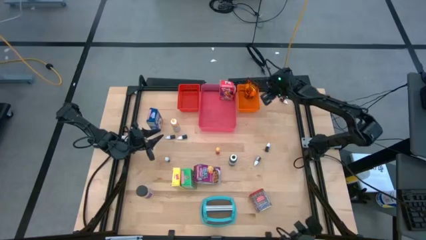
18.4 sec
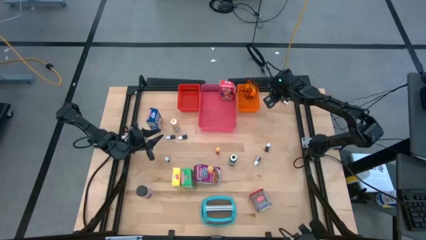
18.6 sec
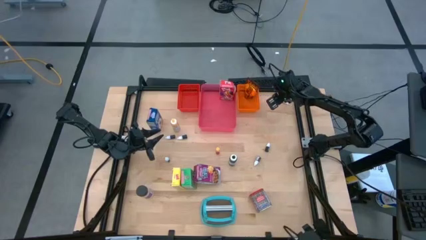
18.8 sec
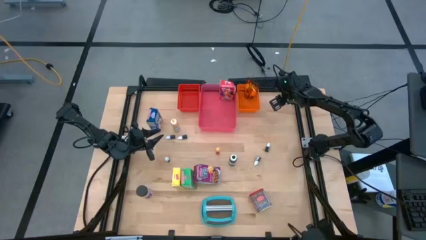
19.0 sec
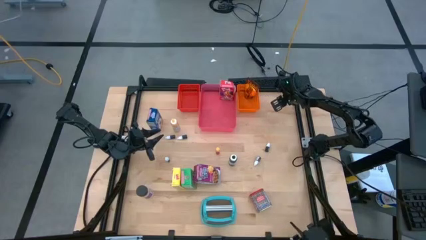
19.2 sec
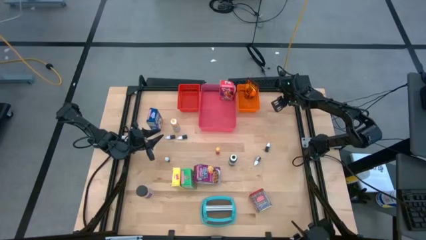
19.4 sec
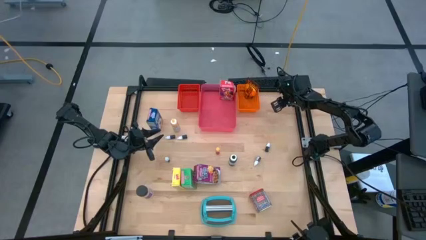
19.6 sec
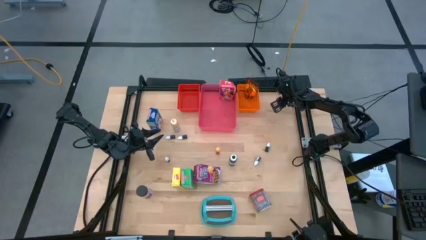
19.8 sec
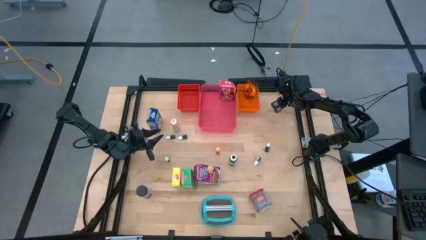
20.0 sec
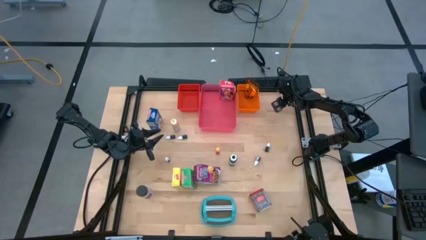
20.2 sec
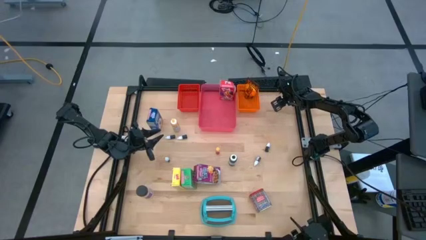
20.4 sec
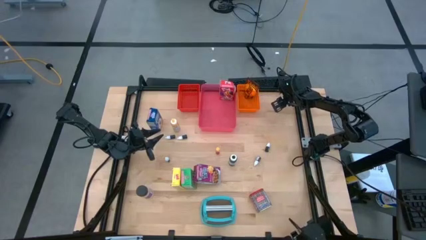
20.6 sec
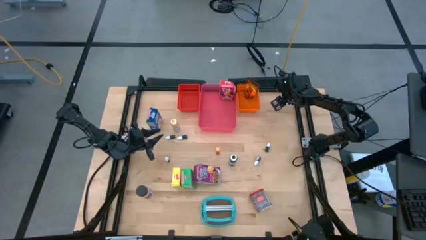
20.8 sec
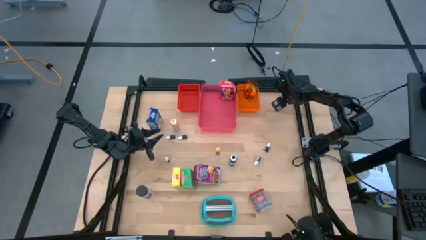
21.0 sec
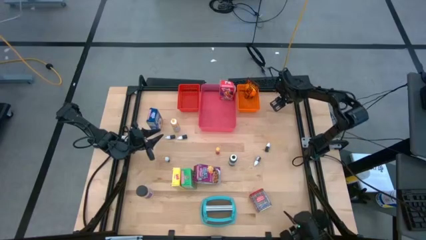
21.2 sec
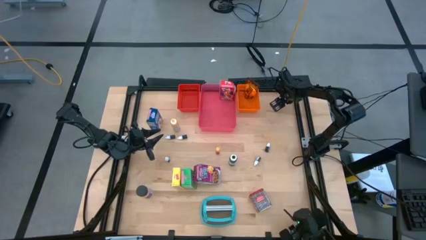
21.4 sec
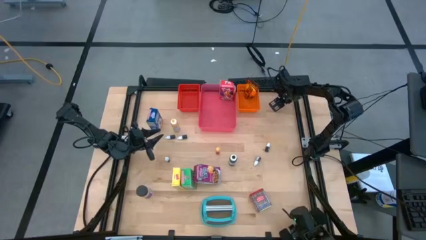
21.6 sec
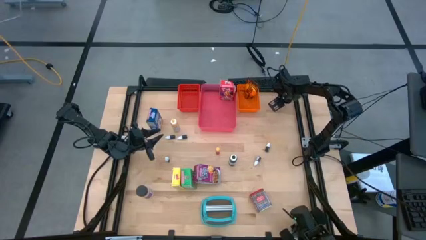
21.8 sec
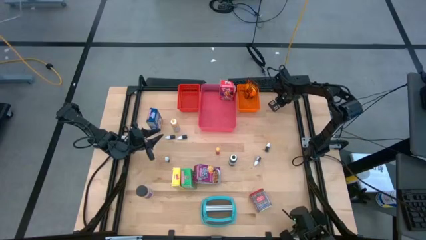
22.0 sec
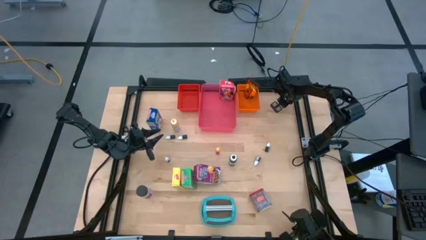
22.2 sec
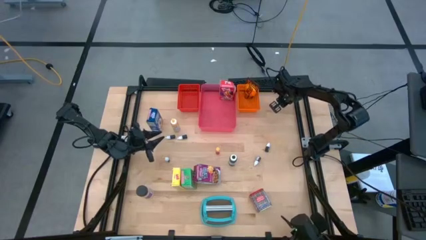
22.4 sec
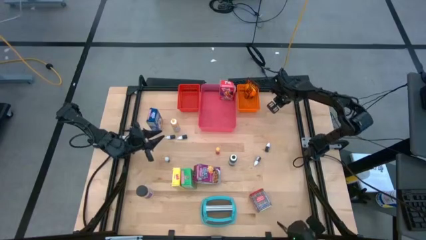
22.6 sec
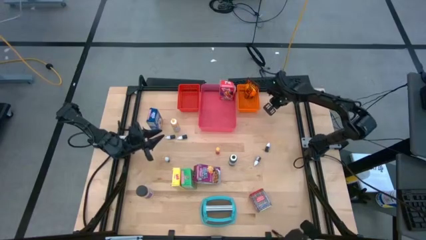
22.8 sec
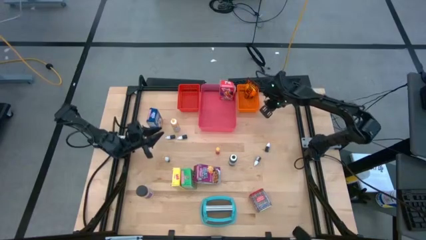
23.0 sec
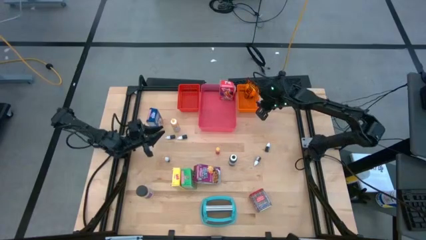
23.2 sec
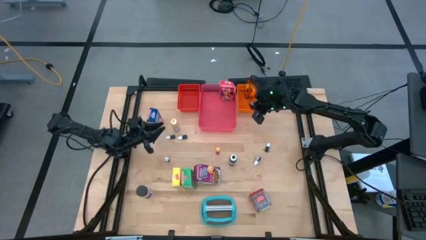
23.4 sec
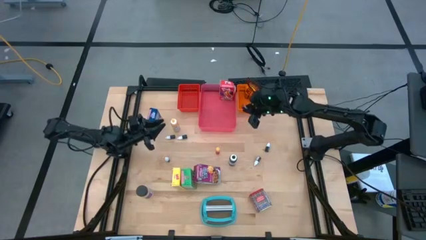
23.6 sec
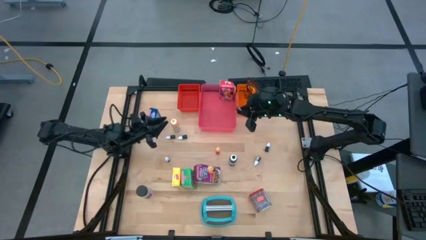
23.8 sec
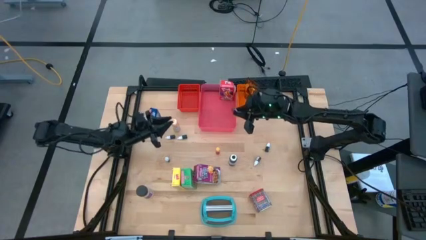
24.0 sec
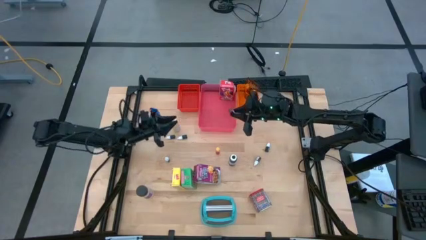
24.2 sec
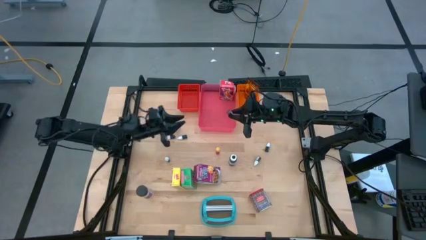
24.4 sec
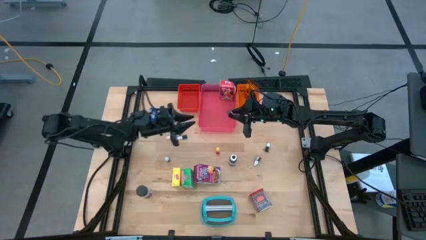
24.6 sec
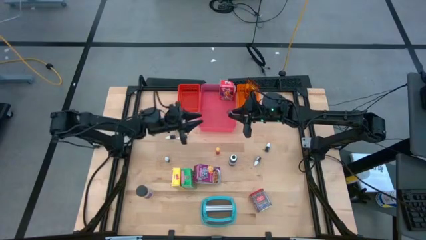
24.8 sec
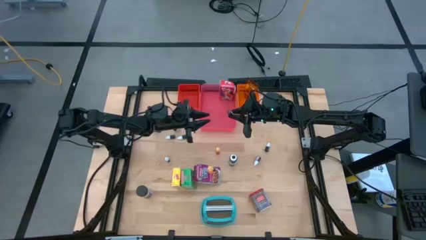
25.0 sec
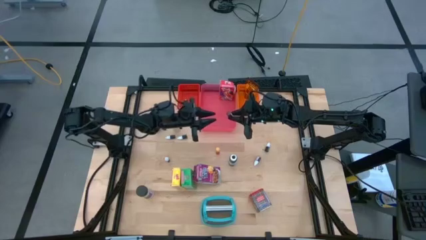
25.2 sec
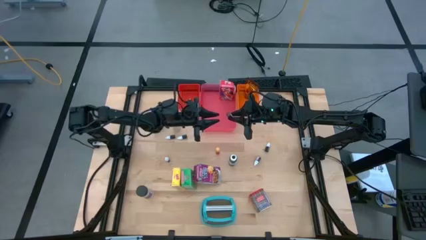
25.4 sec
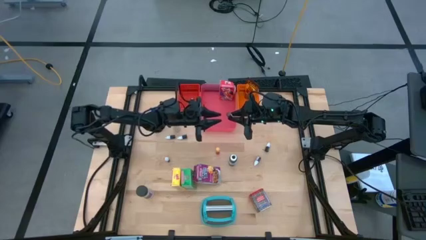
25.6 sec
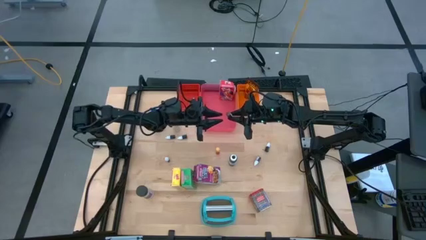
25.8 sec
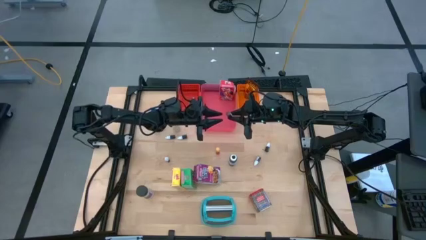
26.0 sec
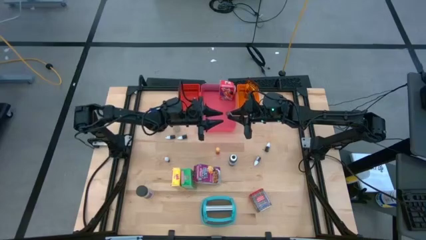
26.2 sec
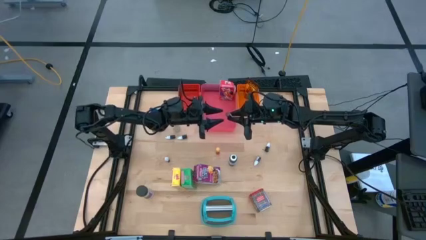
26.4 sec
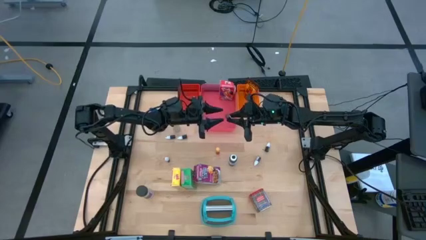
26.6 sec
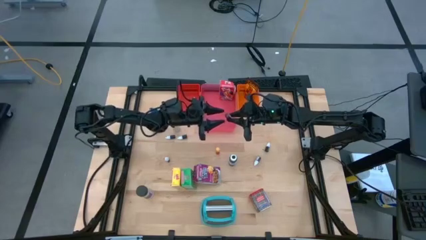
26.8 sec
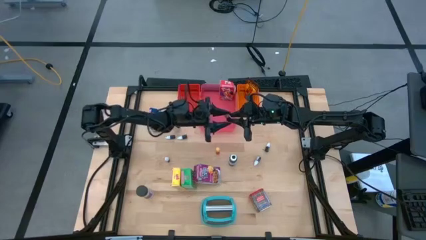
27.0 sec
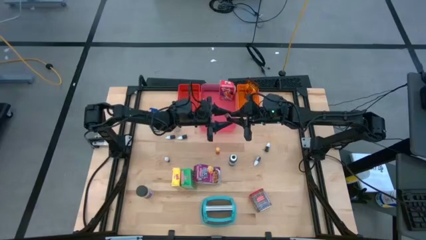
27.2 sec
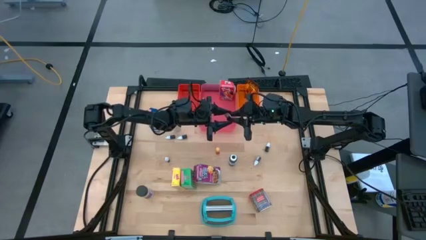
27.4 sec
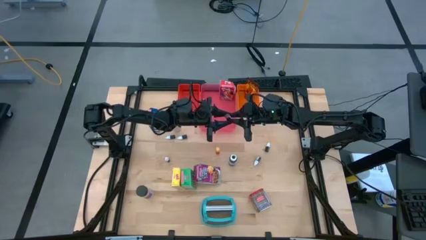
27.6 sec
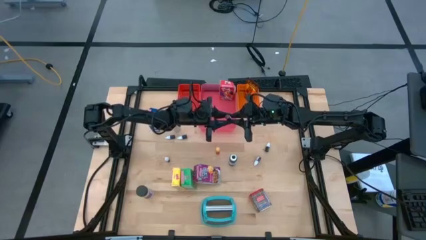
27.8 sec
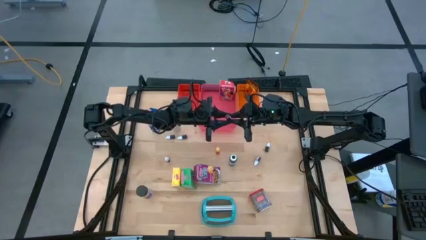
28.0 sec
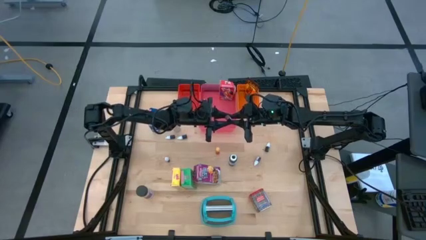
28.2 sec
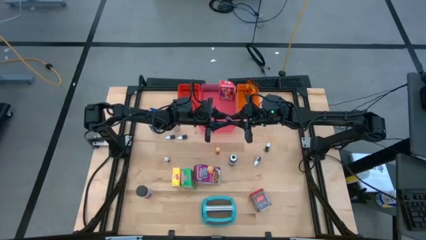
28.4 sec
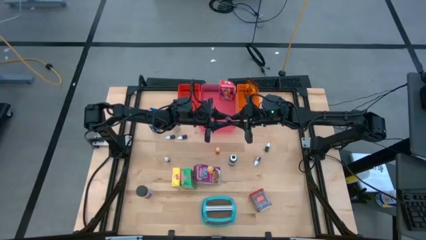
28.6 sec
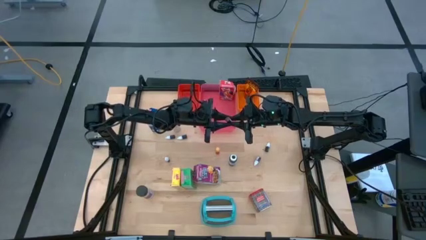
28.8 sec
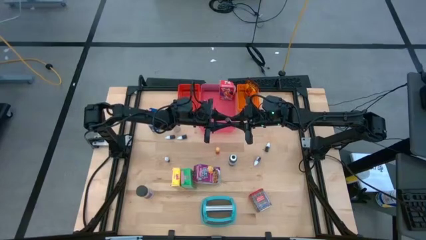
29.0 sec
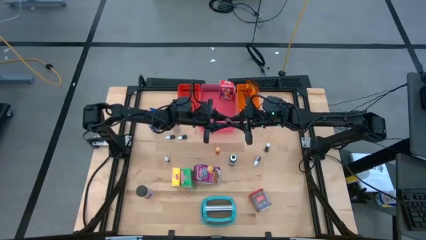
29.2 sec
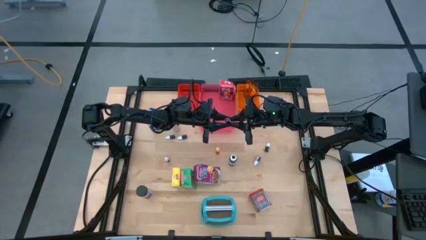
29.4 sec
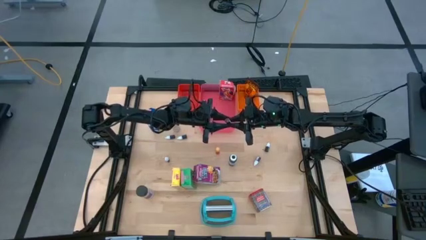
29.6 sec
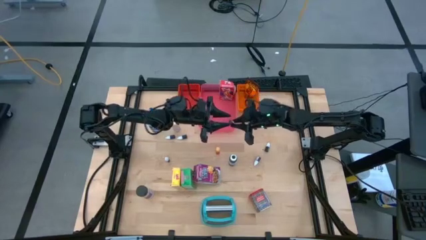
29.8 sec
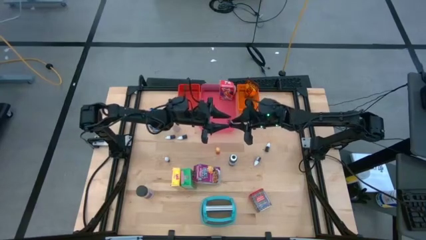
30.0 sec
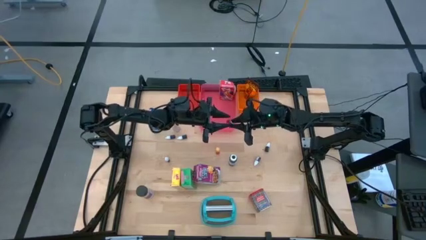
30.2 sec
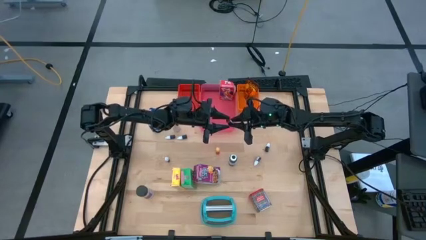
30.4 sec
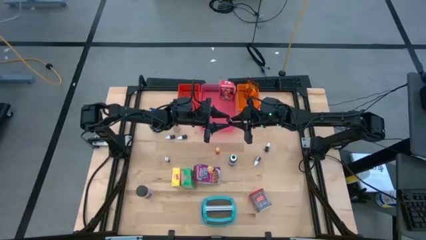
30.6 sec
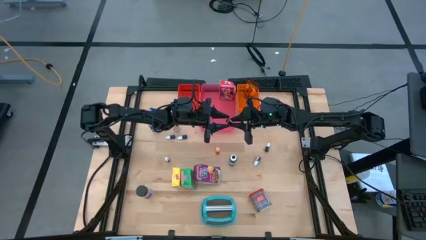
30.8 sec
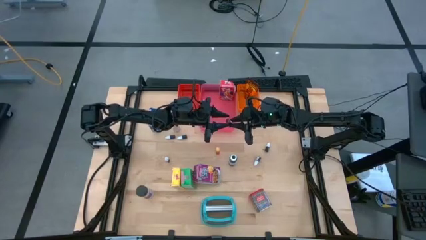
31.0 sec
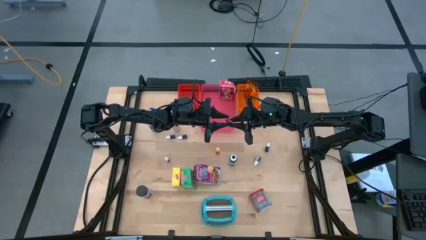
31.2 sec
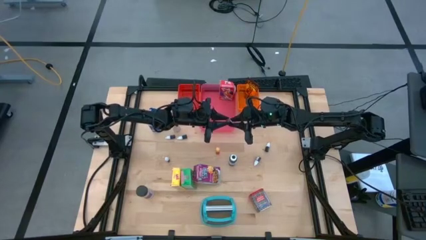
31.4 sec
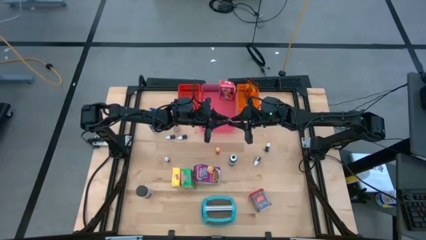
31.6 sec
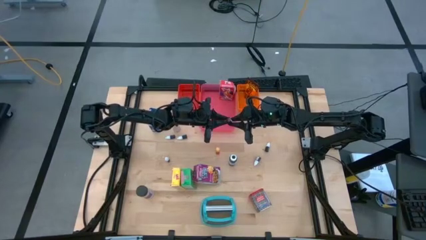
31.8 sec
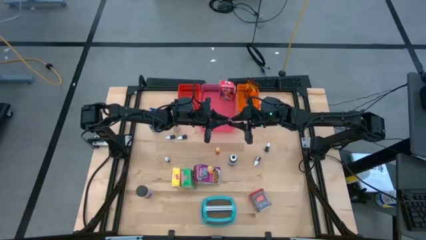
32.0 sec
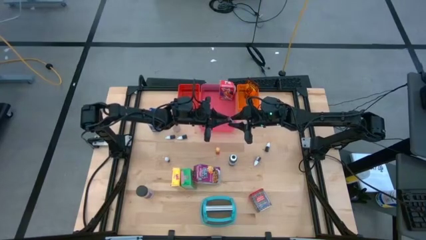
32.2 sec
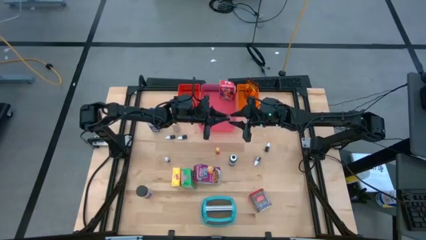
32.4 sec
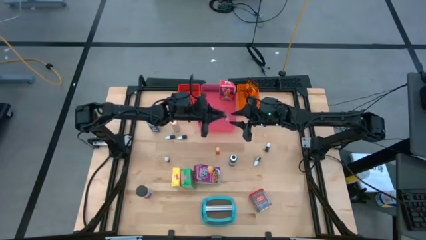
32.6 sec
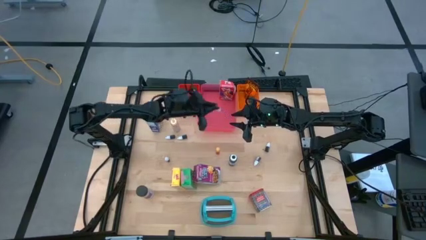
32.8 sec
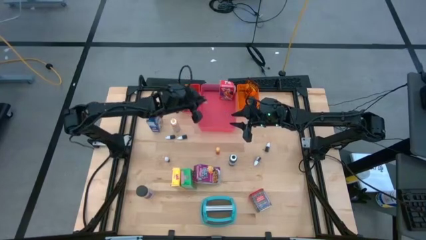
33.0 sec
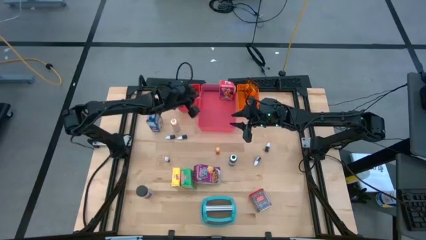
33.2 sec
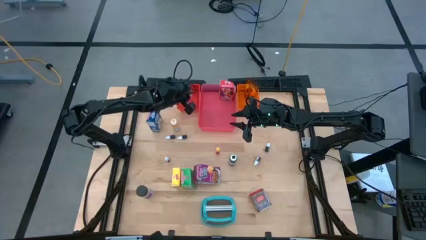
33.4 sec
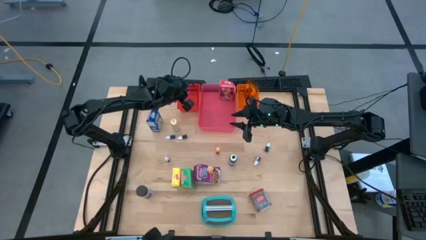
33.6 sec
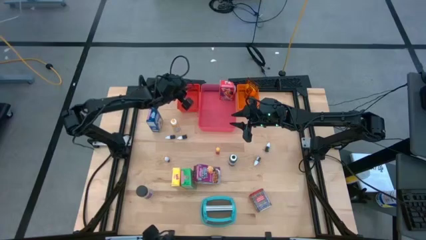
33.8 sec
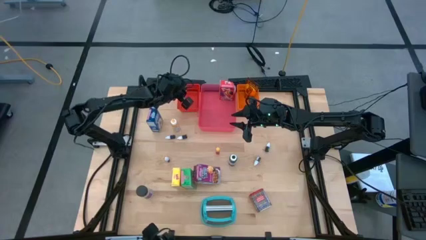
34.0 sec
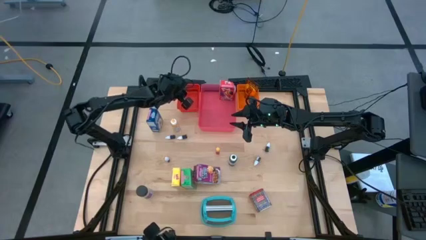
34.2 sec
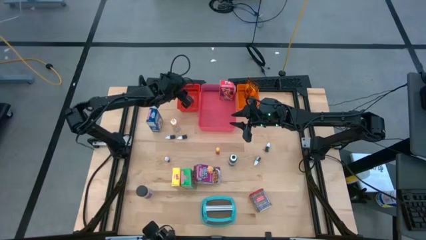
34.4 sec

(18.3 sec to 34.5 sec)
Task: Pick & Place Kitchen Items
Put the small red food coloring bottle into the red bin

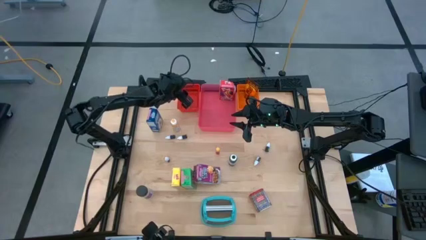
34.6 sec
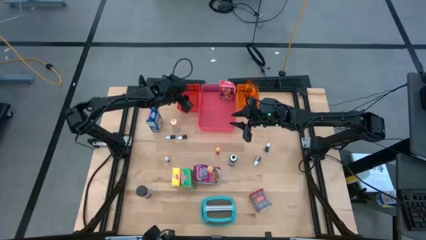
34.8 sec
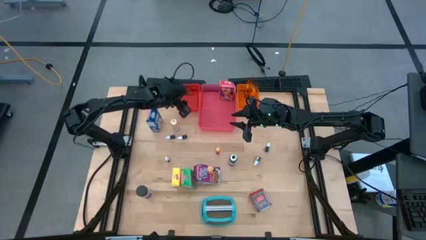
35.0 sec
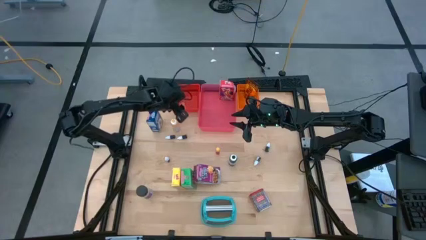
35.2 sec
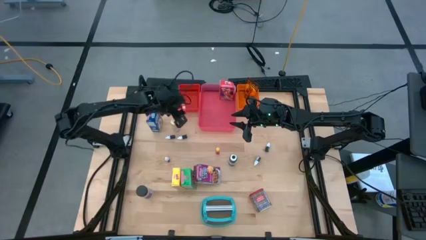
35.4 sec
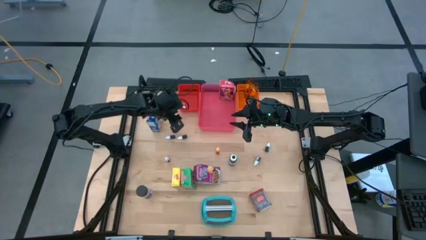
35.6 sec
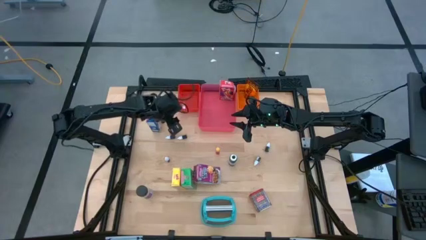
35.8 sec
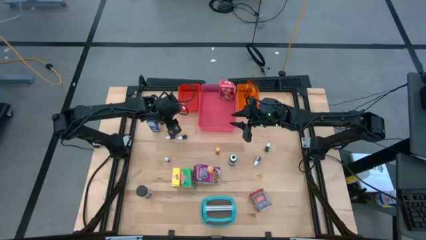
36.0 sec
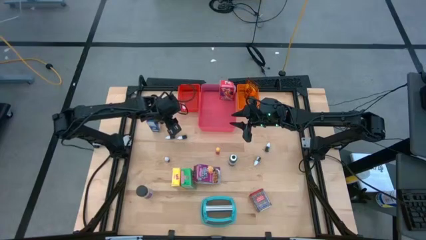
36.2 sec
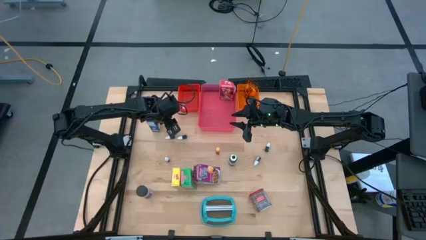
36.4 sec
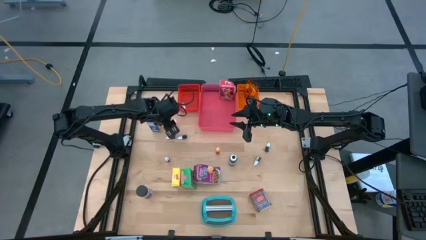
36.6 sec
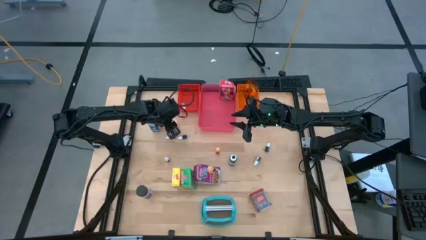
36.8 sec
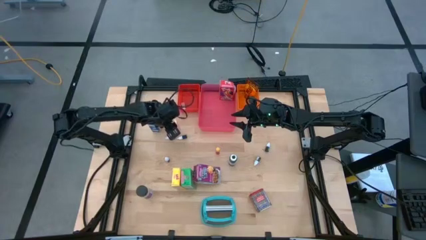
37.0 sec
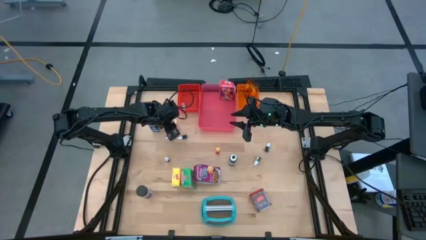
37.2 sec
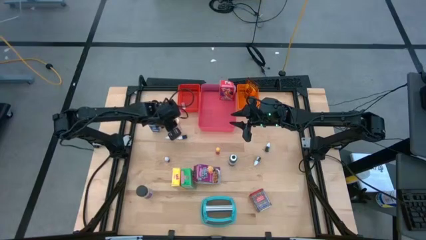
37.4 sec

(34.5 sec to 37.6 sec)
Put the large yellow food coloring bottle into the red bin
